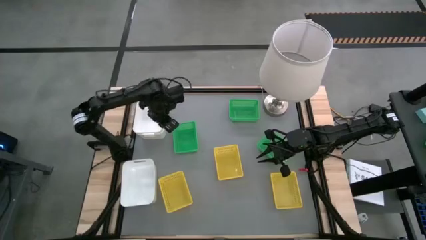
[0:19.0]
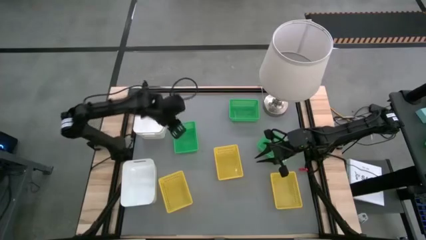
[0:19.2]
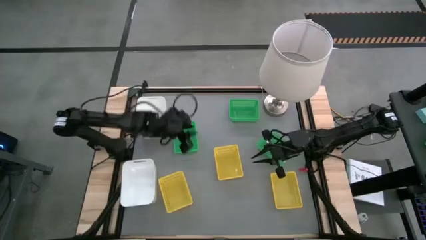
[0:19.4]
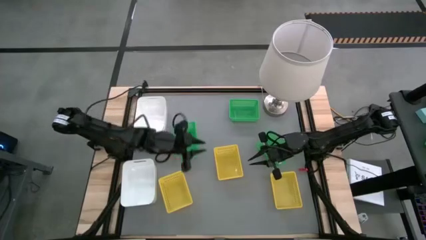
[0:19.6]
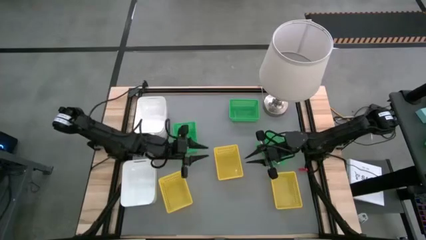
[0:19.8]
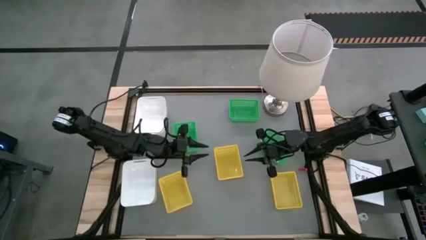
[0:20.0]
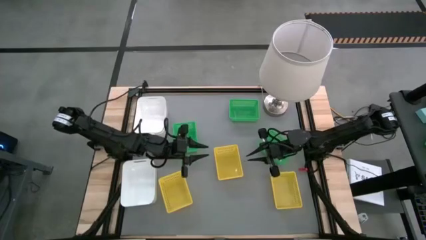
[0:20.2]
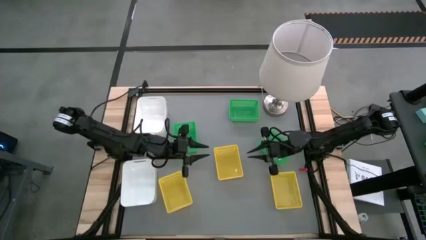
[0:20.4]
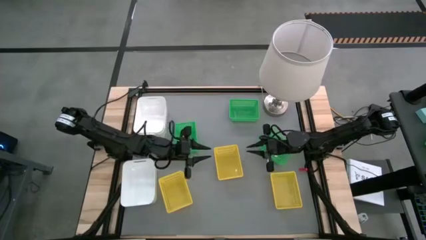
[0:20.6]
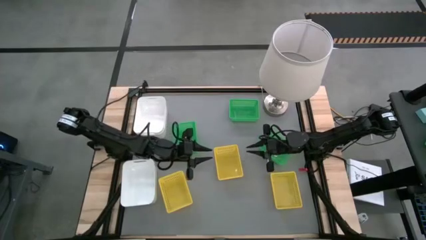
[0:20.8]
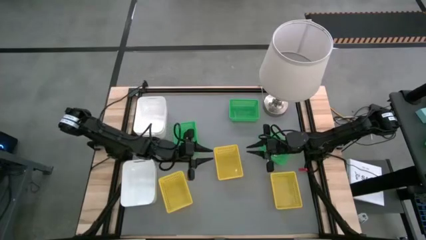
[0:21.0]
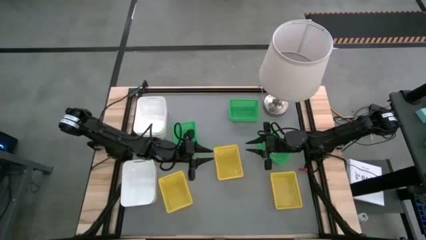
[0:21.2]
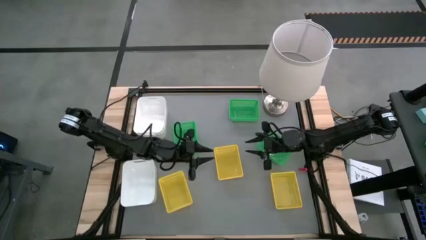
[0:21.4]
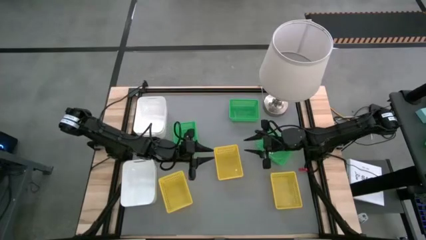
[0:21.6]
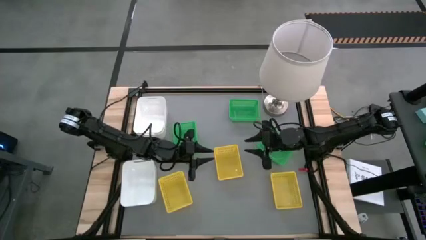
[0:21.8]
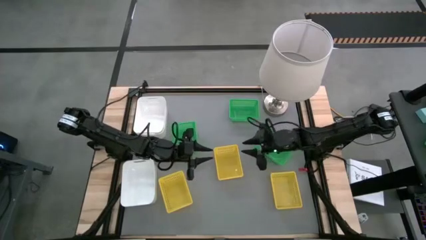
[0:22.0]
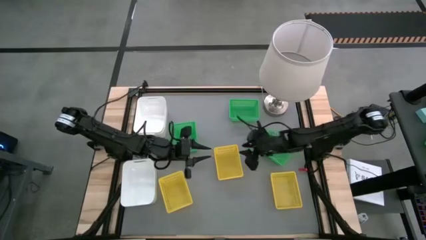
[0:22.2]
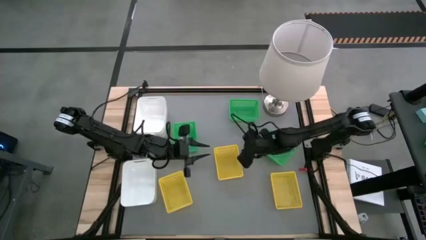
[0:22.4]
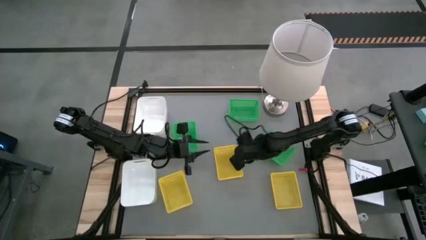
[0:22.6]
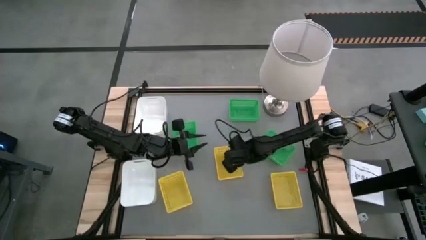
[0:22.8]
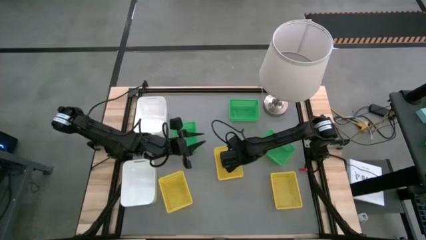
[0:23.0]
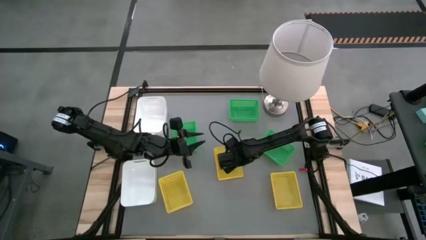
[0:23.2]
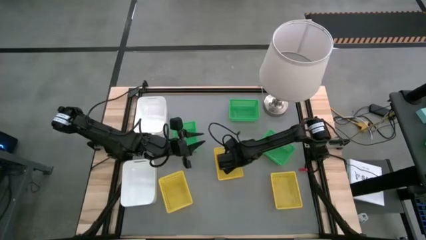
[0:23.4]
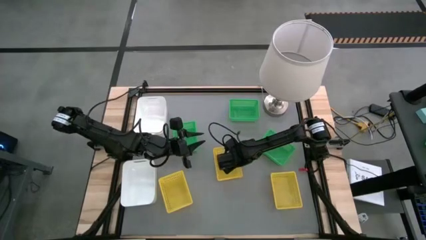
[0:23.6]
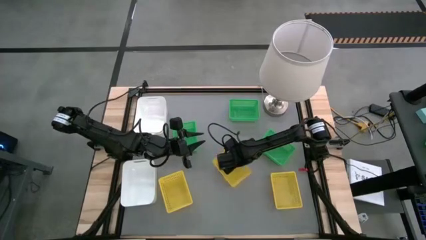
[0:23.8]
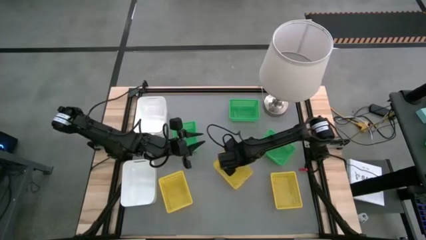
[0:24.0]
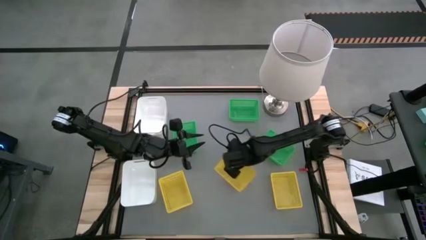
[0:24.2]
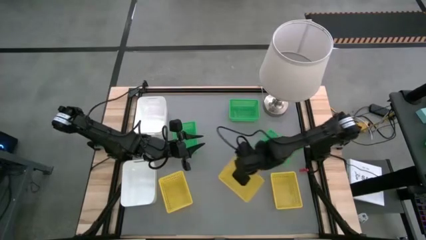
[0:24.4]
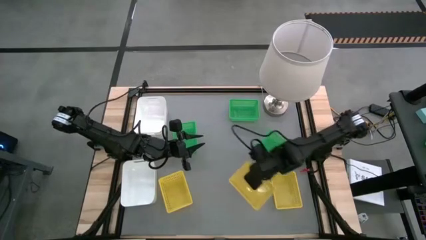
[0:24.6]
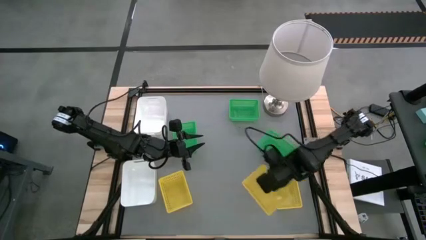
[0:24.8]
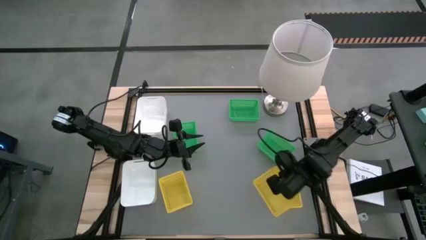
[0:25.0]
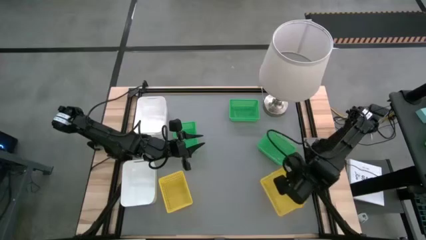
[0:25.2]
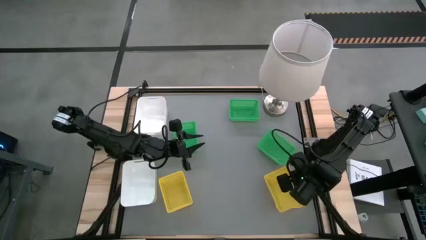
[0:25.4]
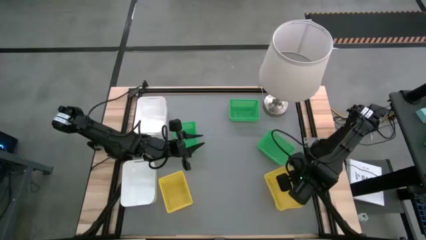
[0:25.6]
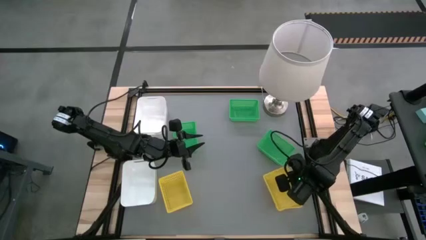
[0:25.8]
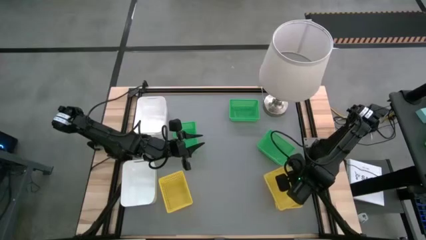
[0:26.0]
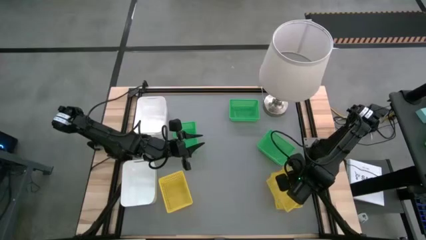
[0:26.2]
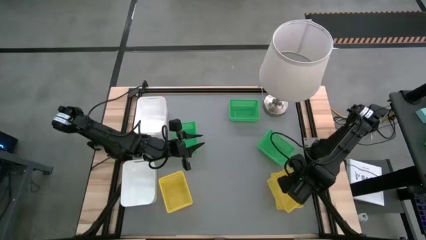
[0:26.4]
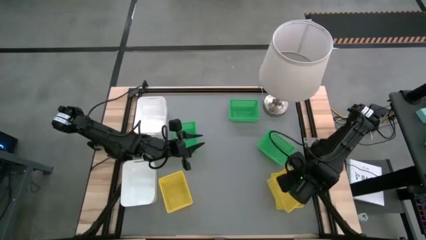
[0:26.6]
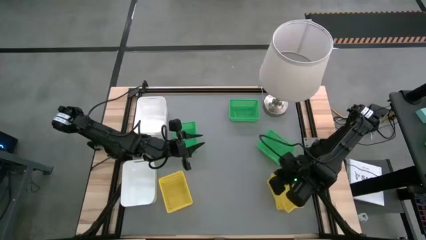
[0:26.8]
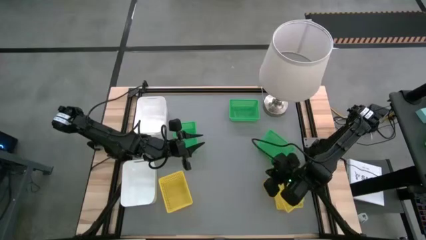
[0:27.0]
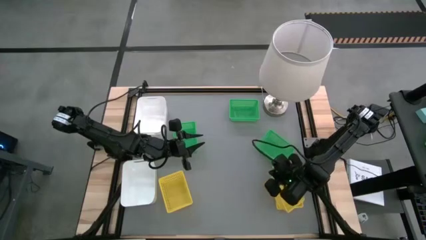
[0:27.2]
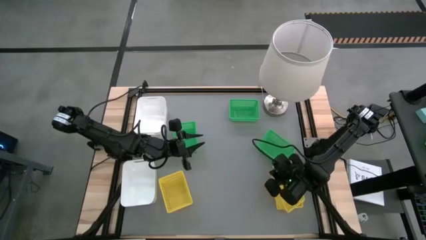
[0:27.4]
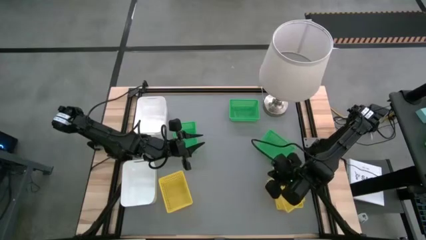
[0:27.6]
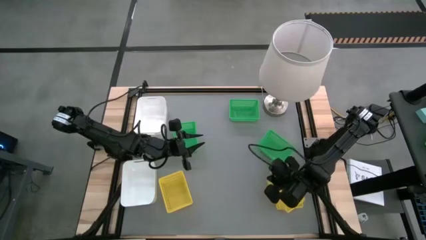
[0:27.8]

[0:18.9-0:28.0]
Stack the middle yellow bin on the bottom right yellow bin

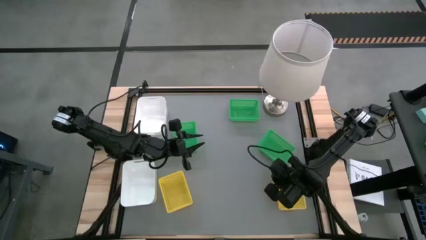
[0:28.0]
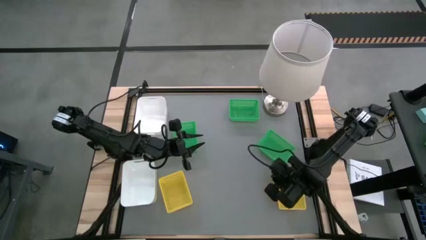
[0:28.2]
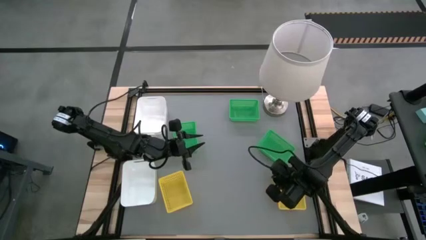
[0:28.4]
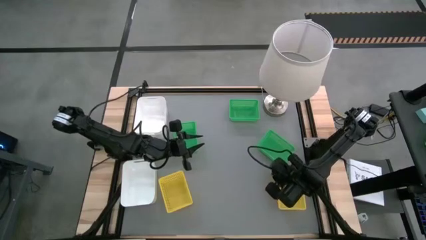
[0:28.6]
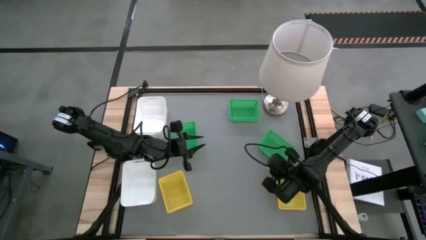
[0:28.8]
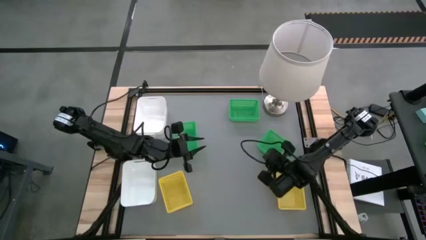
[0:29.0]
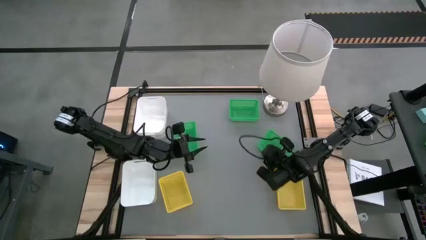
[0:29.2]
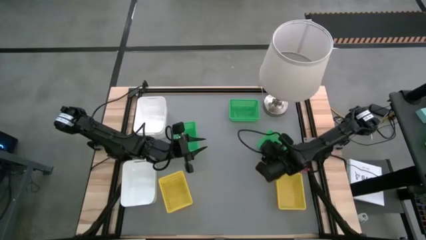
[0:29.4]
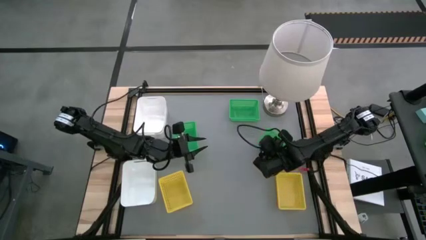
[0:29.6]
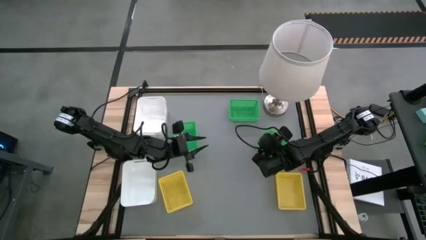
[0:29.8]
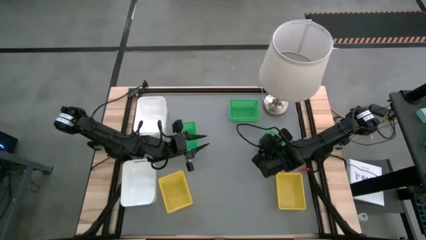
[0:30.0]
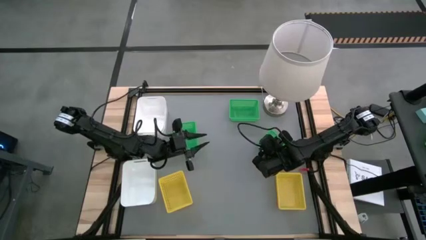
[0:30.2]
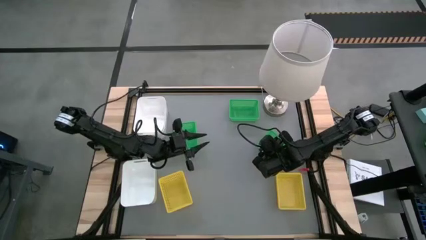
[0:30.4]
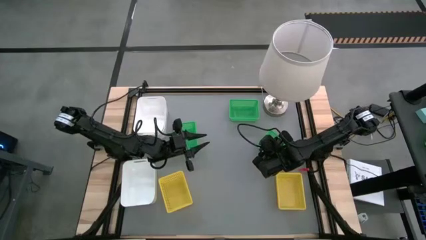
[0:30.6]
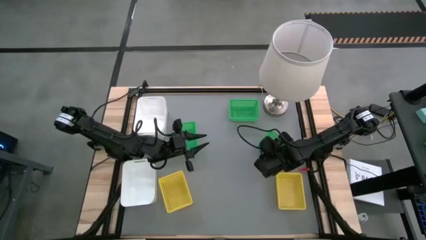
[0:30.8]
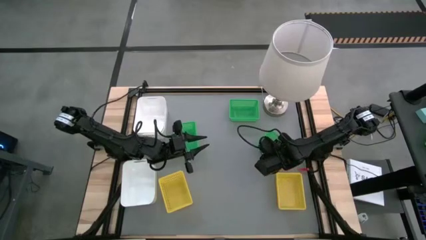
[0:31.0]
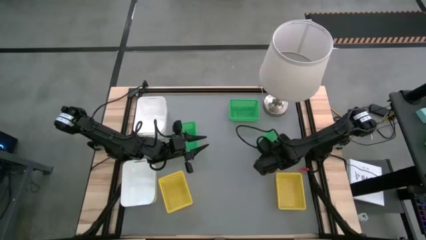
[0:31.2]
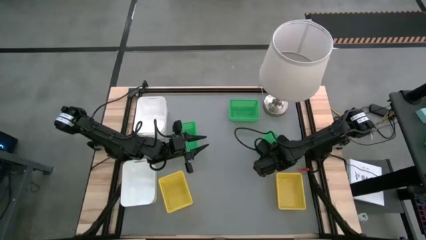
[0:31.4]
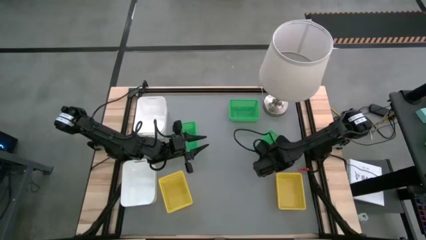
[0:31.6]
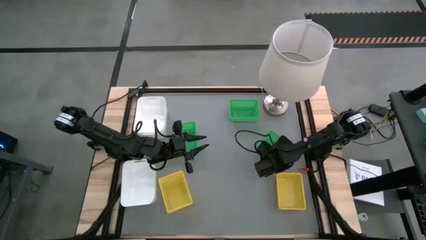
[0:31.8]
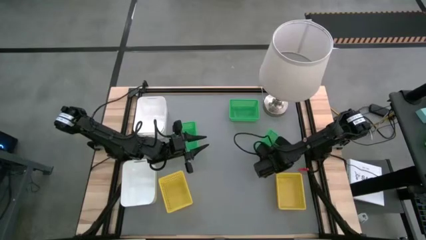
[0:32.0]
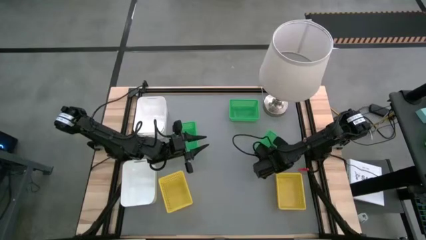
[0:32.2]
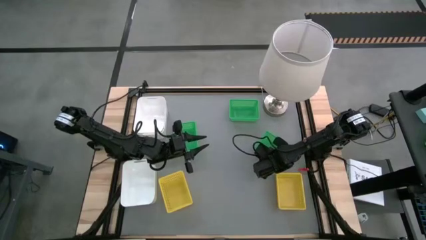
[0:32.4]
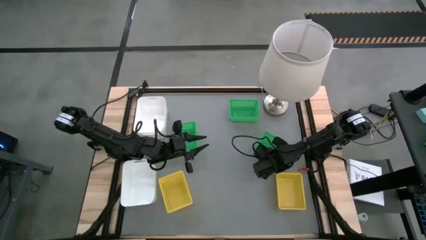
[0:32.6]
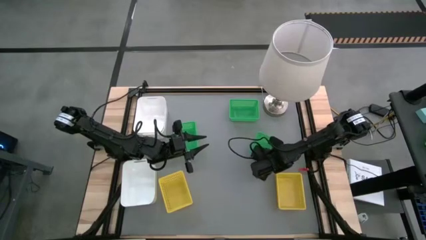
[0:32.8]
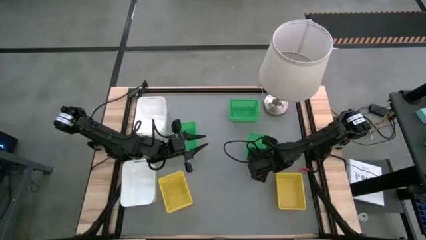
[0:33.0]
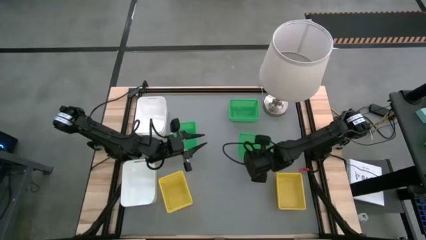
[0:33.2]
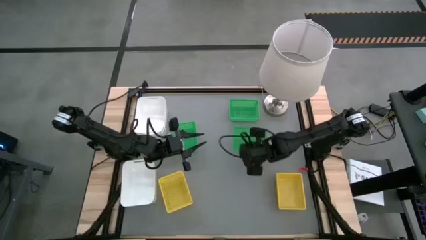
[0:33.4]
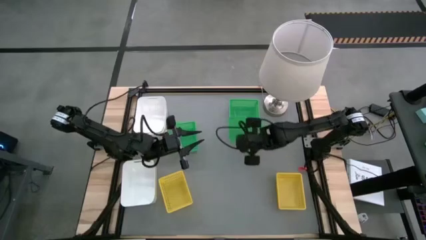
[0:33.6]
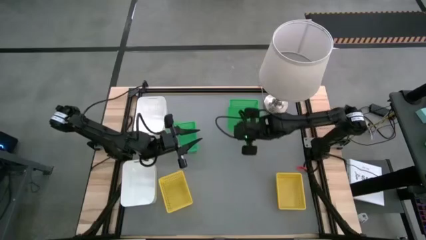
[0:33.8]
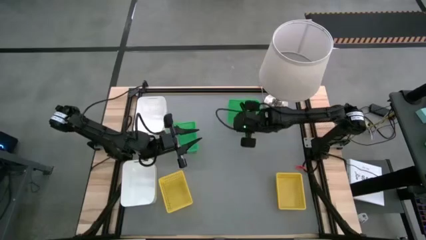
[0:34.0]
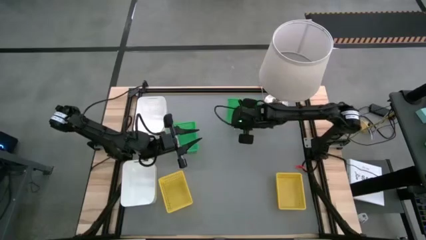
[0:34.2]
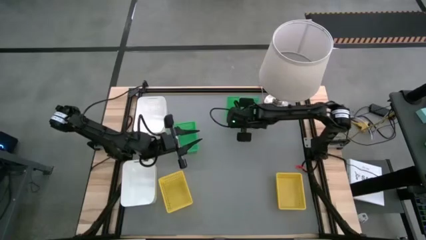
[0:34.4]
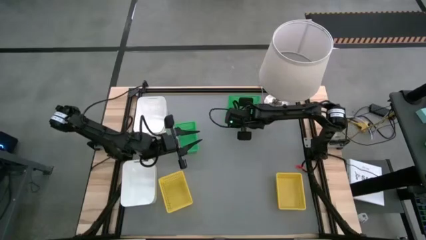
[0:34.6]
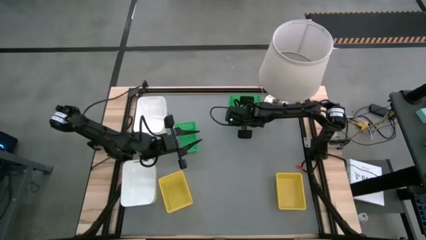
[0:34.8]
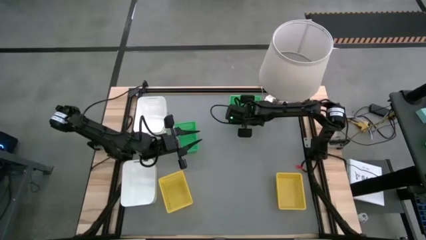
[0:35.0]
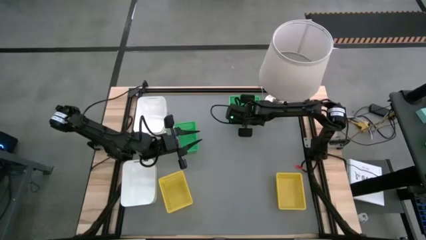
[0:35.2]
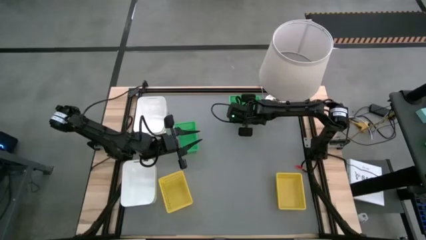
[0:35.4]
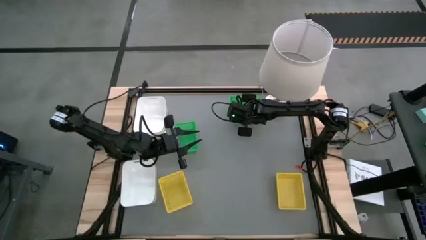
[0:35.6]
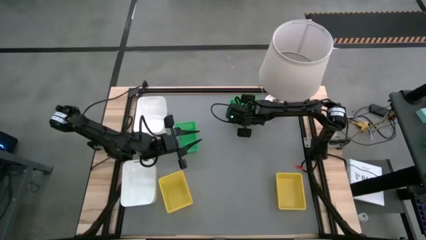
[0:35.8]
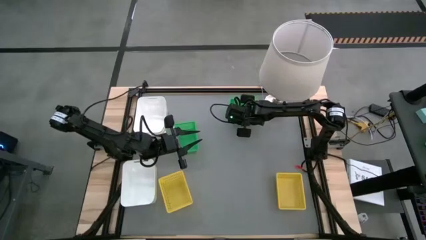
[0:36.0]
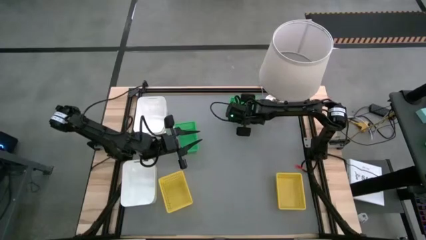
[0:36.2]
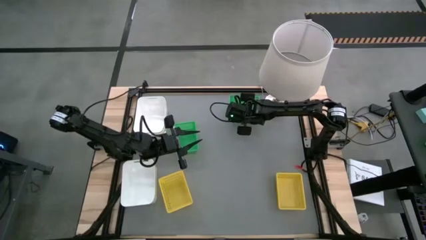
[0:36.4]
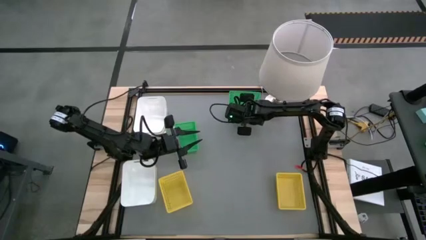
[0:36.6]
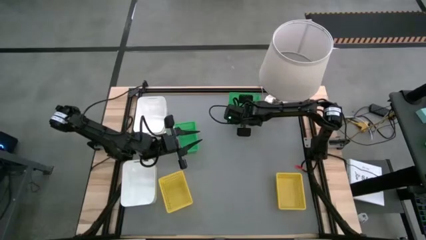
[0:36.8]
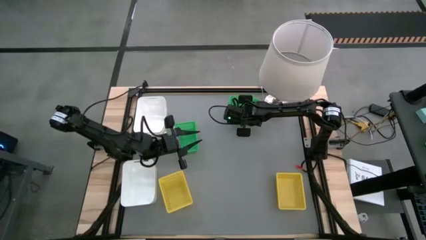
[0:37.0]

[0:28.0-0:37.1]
Stack the bottom right green bin on the top green bin
